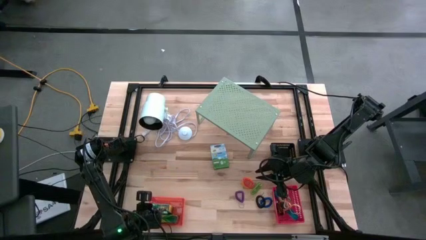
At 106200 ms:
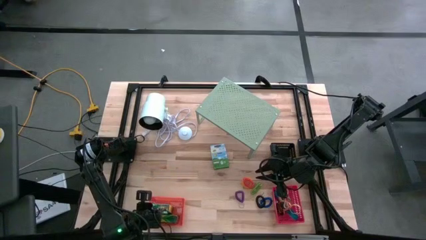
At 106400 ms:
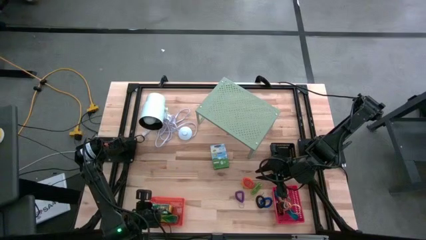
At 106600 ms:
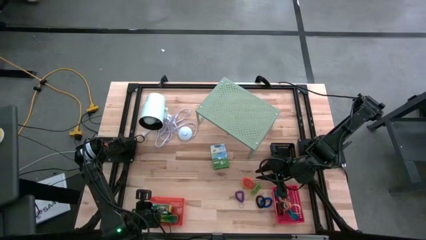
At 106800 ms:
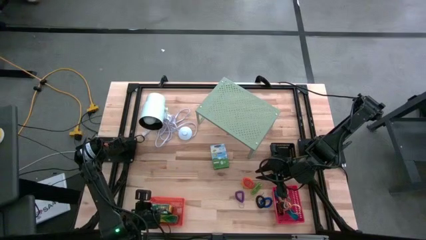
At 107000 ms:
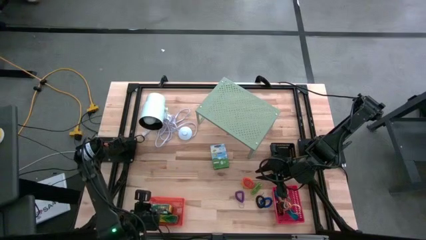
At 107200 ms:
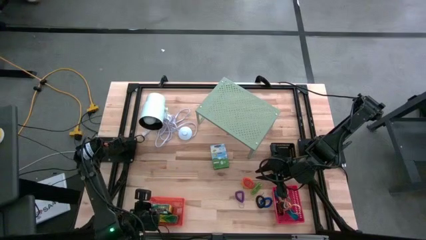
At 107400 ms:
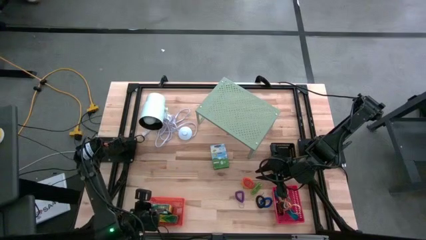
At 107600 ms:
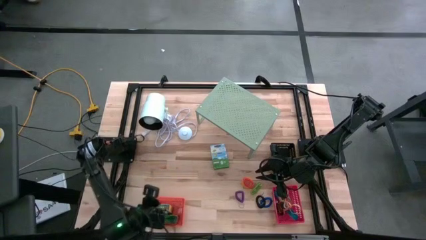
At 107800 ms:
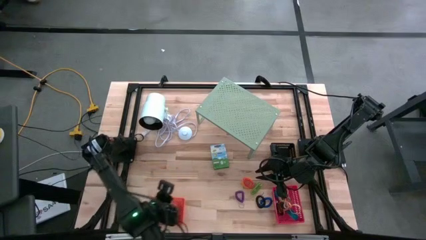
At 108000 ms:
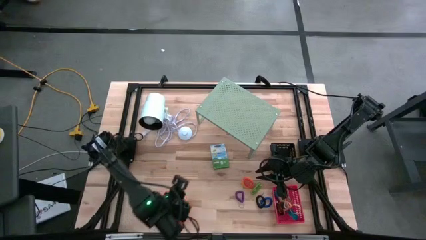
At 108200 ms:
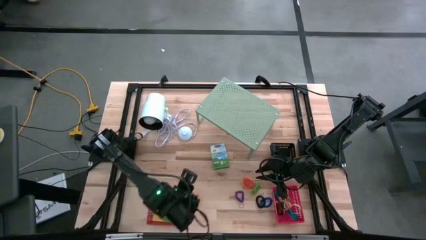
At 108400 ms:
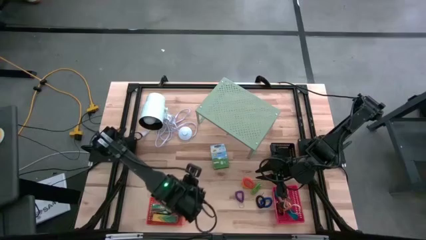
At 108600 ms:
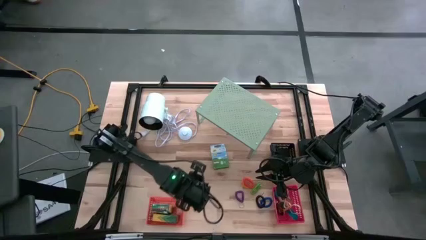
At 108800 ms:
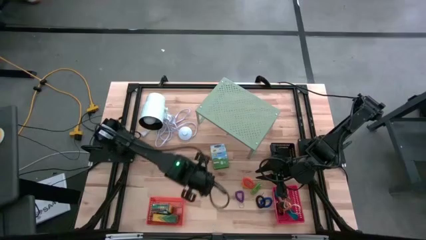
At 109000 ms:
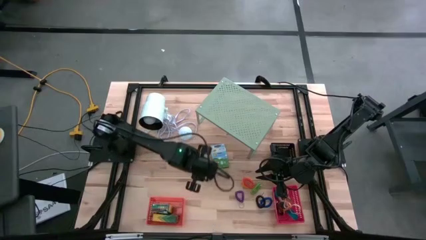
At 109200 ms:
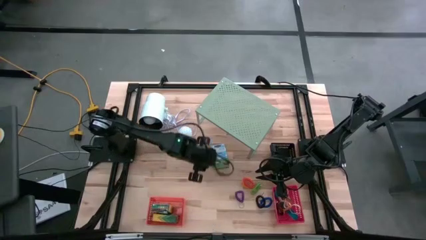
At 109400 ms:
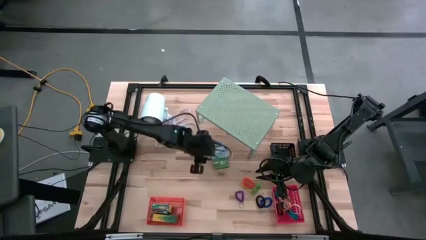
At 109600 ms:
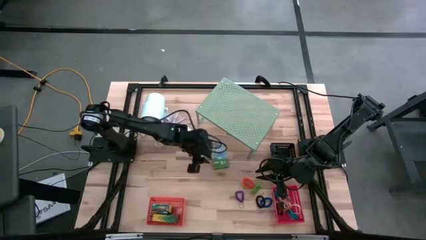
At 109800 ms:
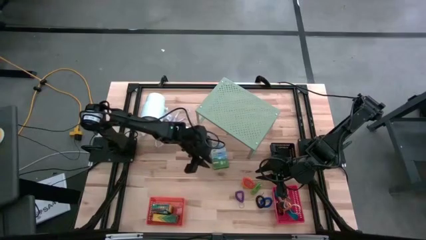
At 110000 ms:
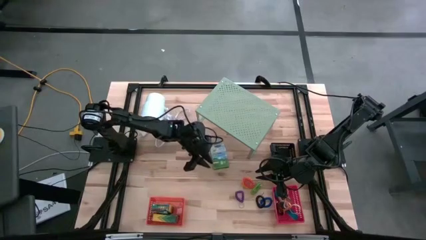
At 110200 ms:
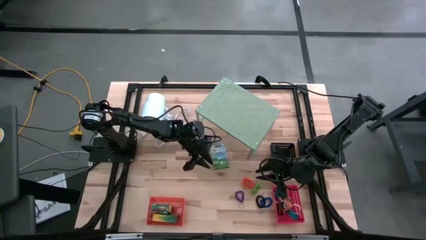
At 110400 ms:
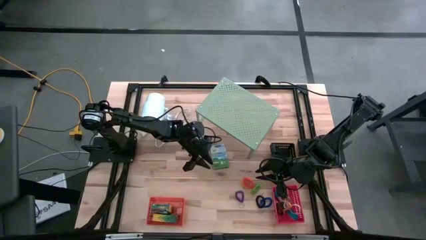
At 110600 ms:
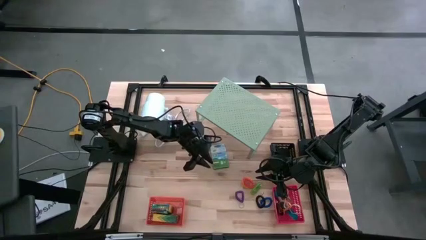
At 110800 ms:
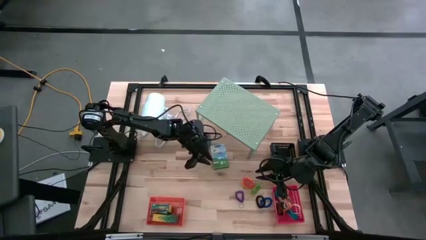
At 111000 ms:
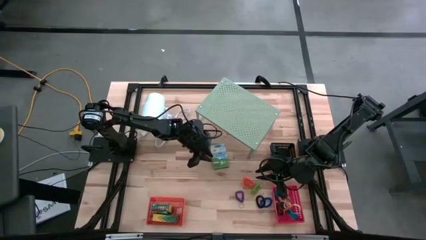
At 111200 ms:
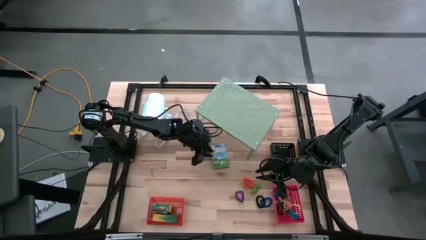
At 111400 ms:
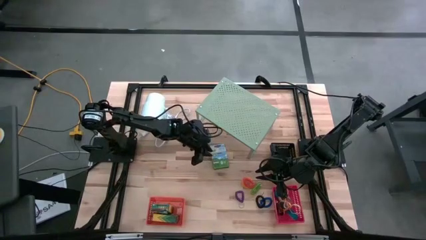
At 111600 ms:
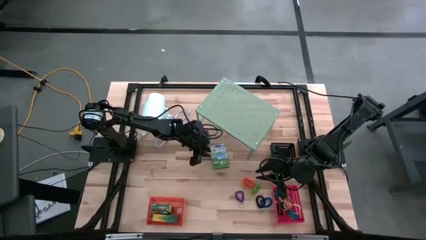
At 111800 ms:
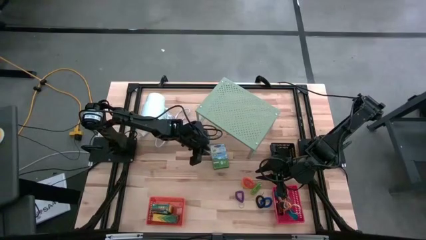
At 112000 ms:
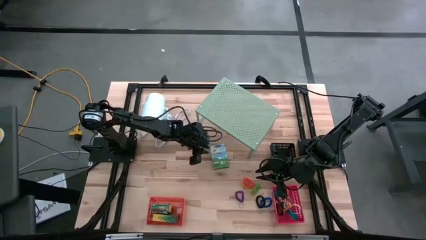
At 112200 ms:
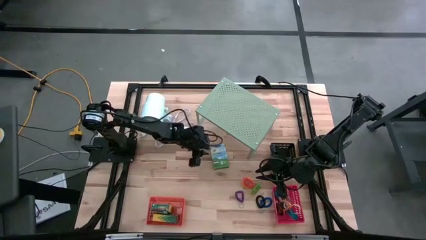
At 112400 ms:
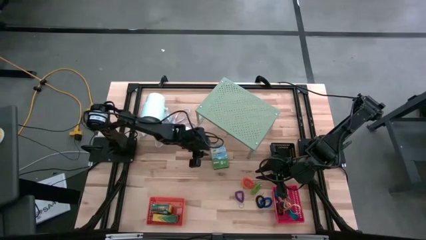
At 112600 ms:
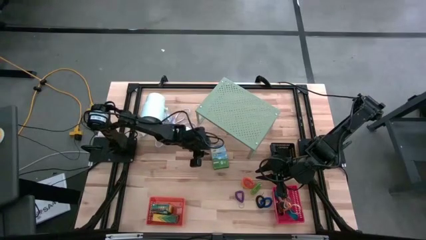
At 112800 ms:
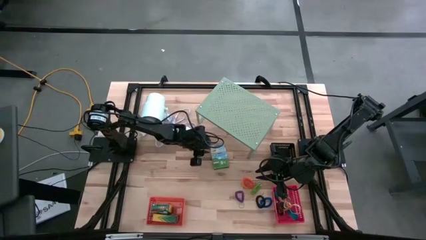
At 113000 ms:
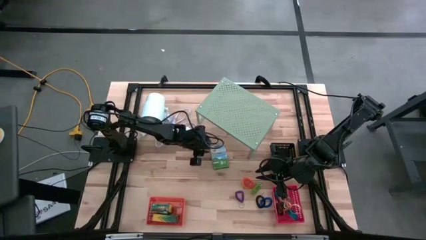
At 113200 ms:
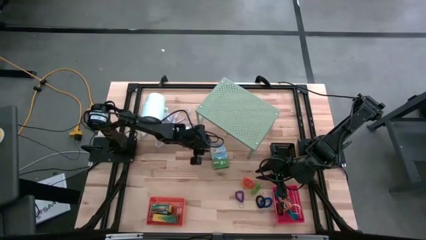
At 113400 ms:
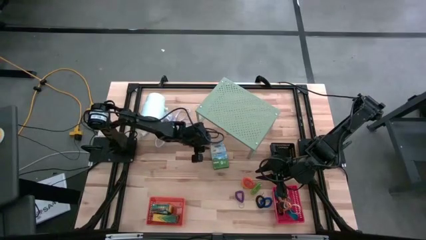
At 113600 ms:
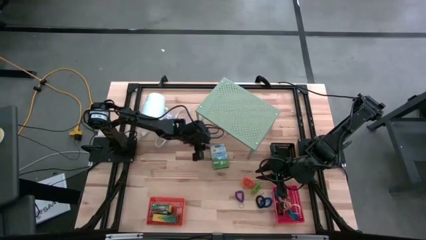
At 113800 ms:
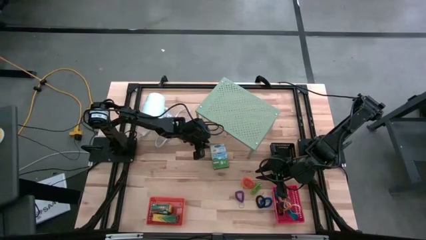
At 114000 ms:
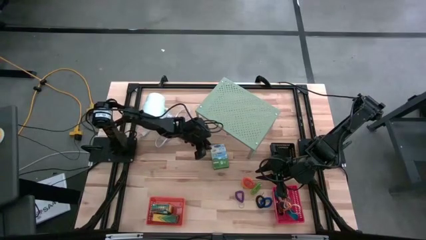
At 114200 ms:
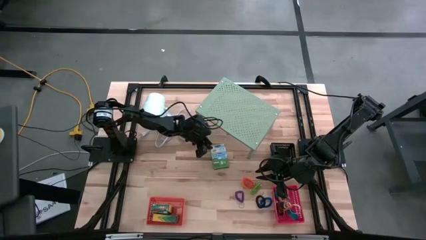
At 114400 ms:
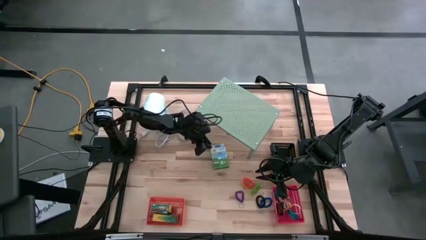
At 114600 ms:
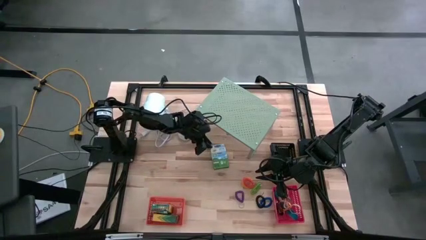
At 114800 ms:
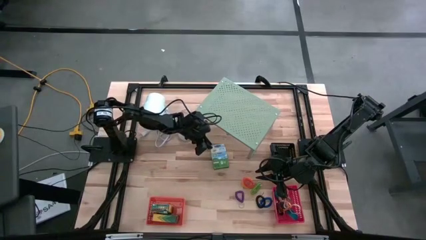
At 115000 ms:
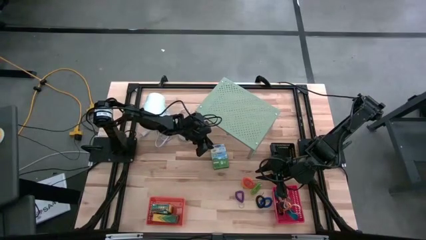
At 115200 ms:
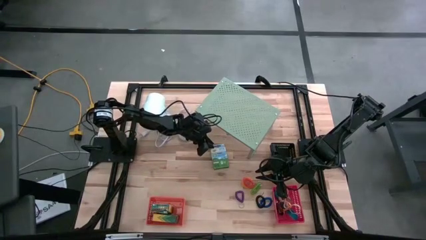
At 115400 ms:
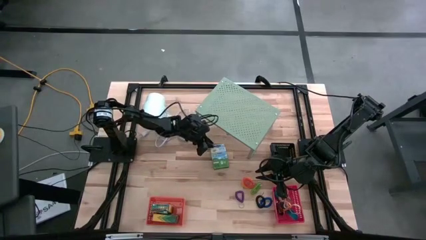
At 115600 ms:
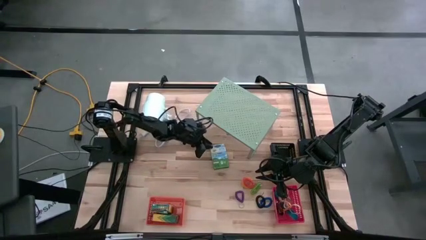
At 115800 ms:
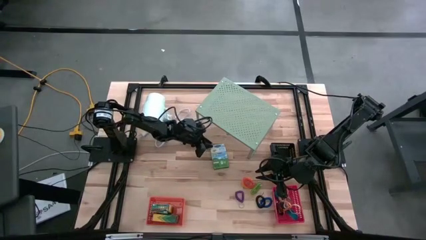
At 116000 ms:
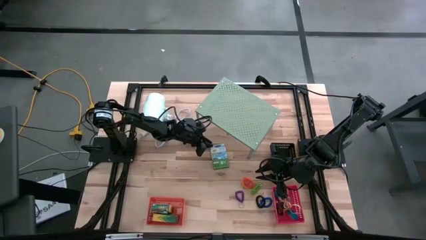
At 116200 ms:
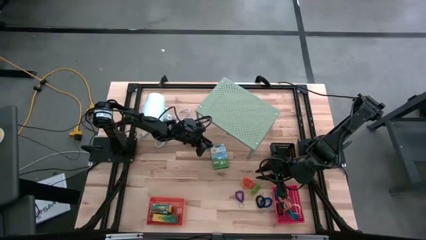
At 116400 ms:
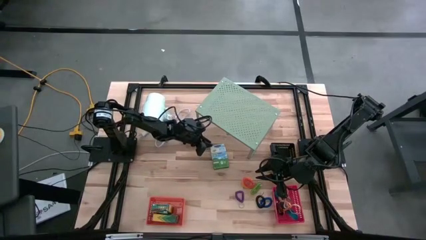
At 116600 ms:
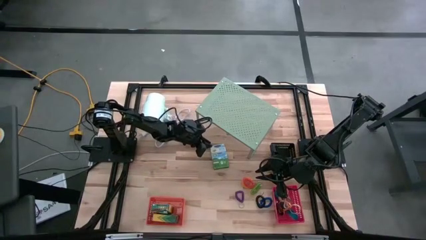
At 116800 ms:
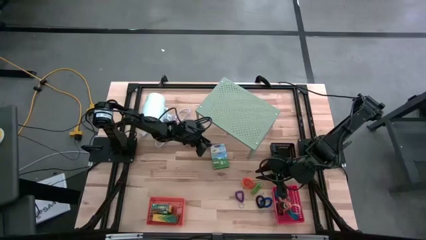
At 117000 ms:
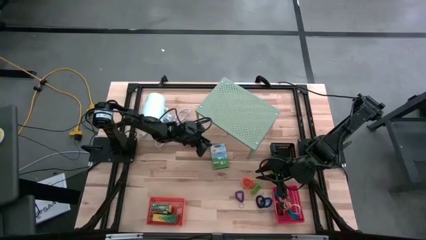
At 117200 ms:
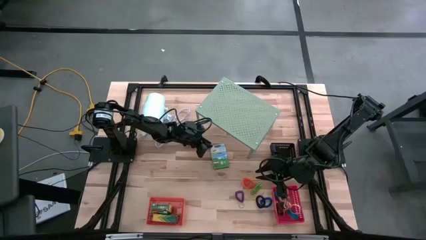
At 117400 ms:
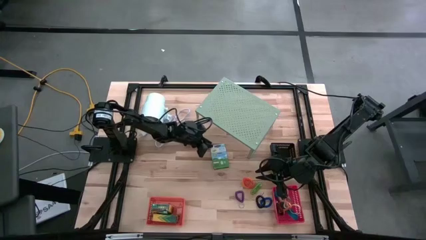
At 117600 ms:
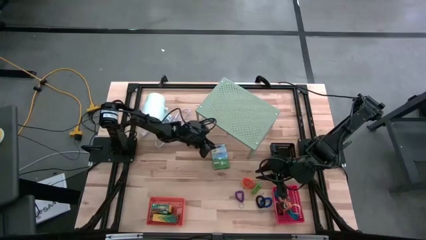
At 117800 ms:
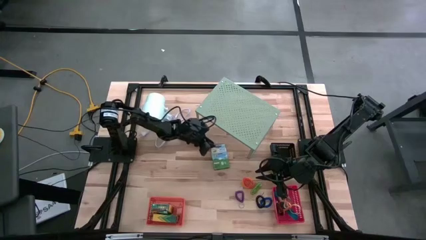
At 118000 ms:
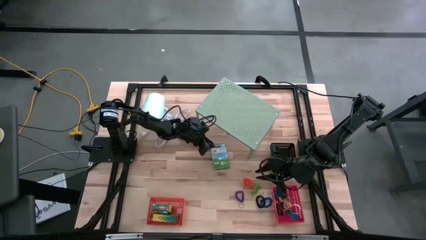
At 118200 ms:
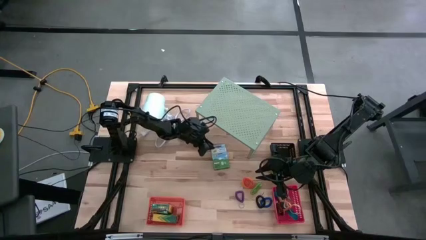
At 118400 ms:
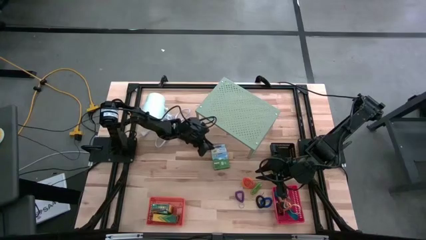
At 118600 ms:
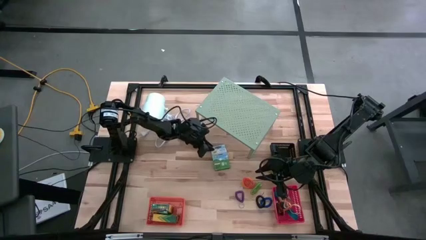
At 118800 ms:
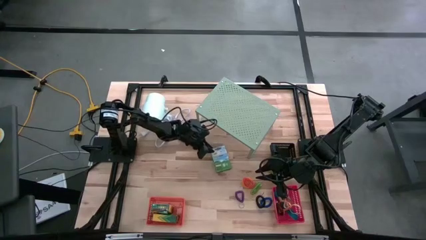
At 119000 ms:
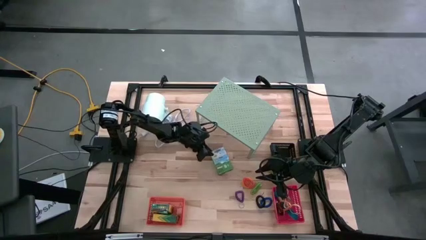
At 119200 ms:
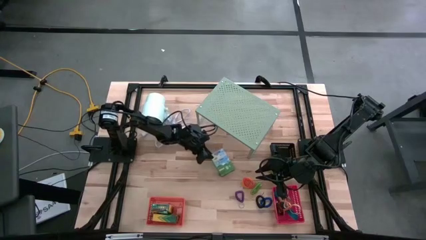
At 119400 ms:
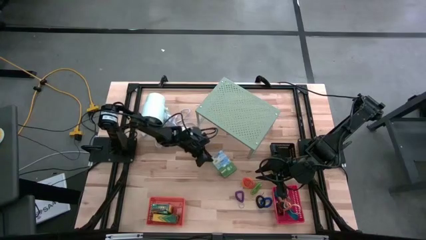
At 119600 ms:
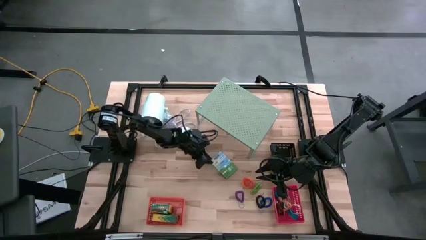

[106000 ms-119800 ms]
Task: Pick & Place Office Desk Supplies
Put the crayon box into the orange bin
